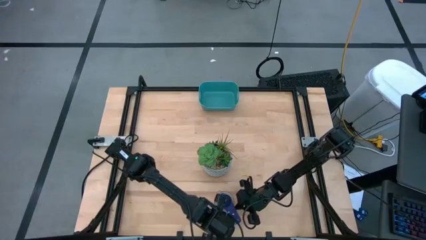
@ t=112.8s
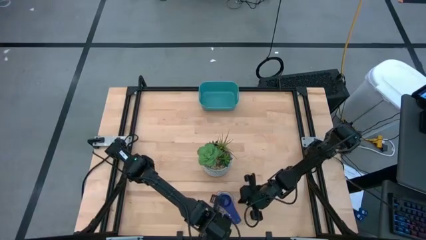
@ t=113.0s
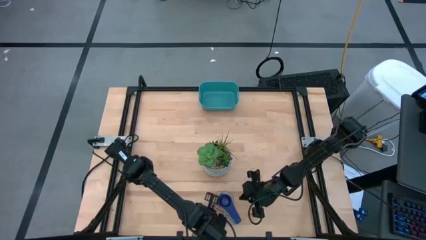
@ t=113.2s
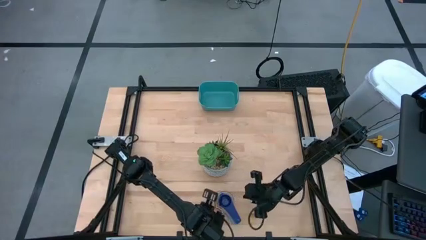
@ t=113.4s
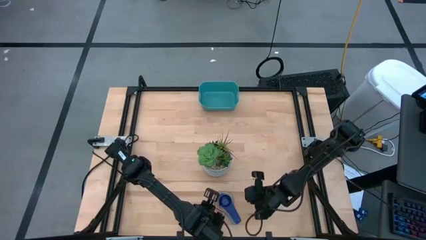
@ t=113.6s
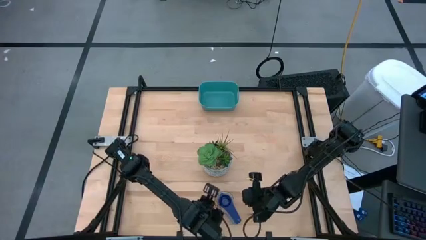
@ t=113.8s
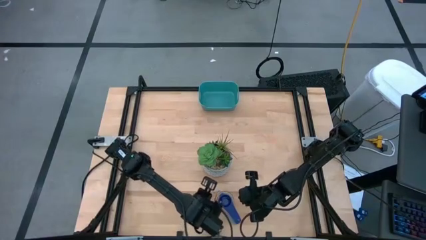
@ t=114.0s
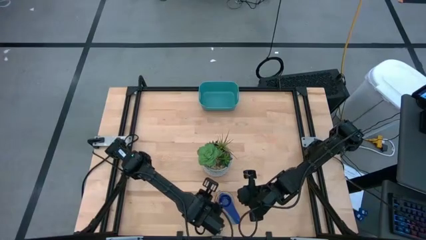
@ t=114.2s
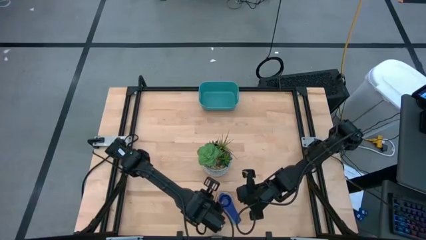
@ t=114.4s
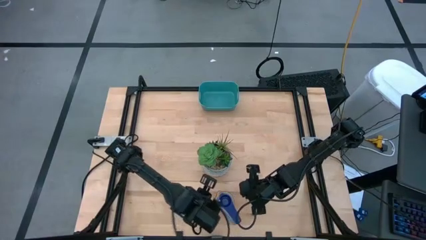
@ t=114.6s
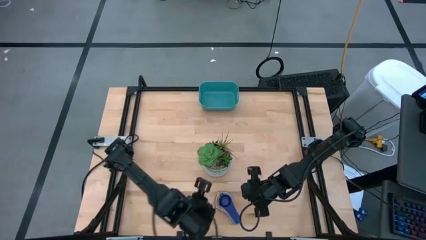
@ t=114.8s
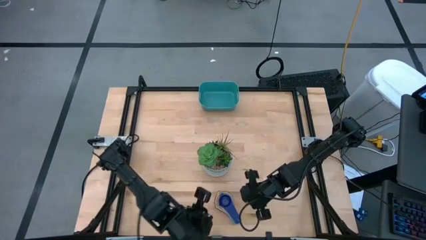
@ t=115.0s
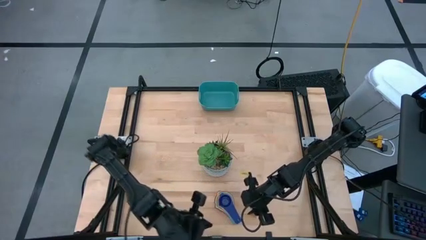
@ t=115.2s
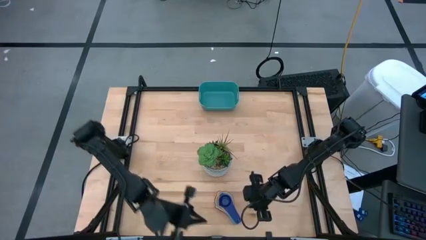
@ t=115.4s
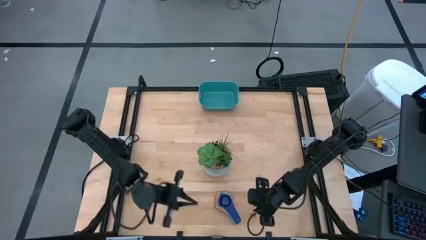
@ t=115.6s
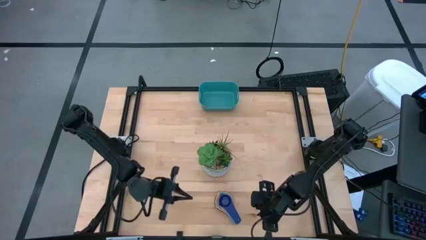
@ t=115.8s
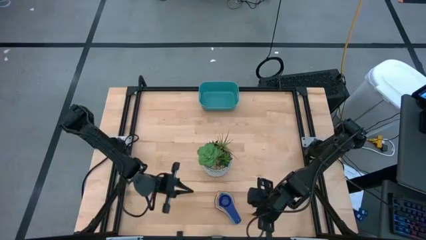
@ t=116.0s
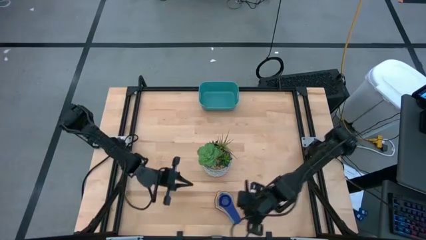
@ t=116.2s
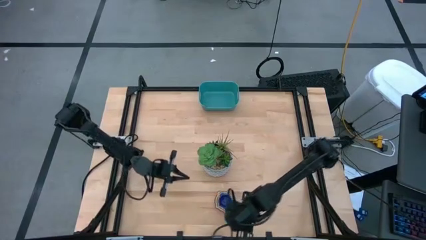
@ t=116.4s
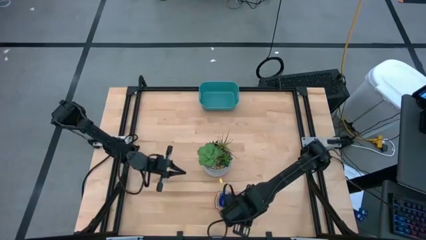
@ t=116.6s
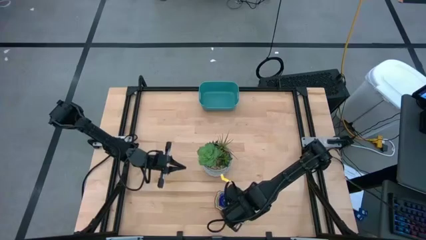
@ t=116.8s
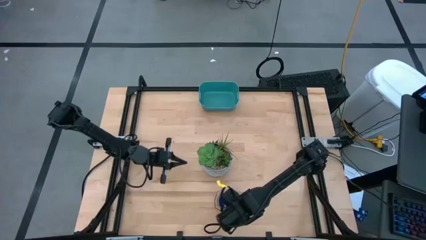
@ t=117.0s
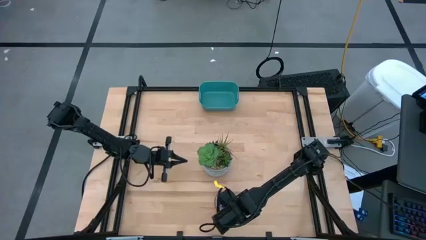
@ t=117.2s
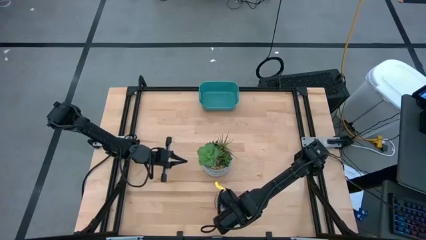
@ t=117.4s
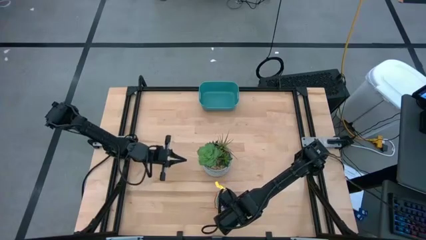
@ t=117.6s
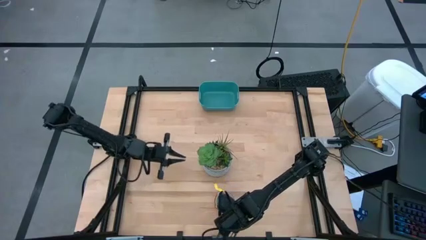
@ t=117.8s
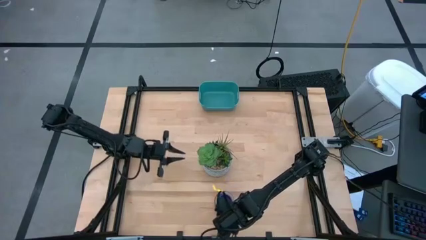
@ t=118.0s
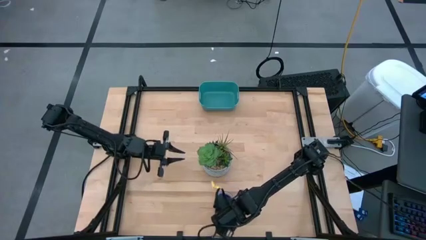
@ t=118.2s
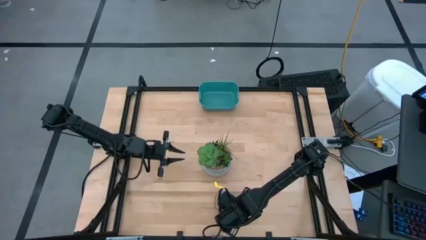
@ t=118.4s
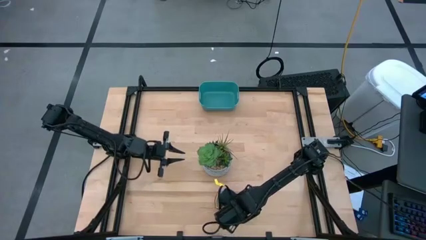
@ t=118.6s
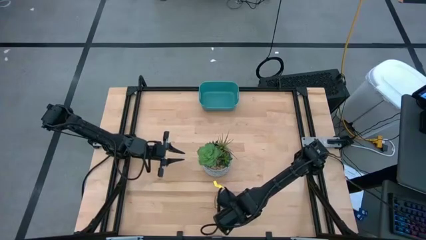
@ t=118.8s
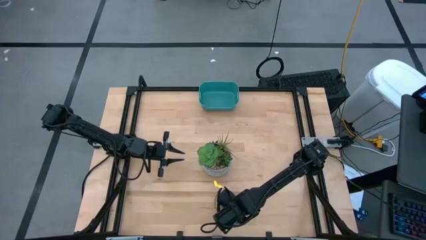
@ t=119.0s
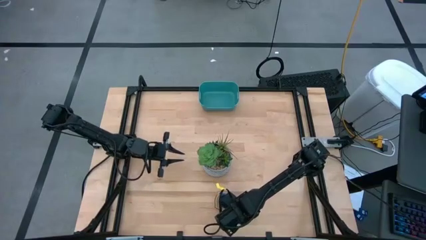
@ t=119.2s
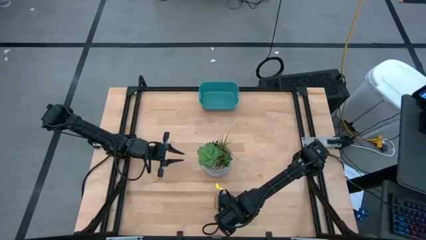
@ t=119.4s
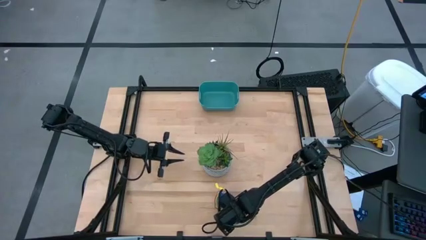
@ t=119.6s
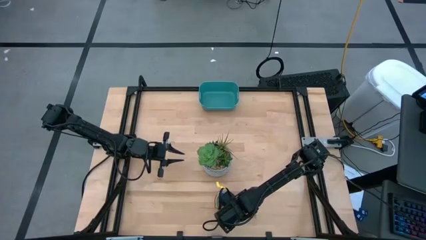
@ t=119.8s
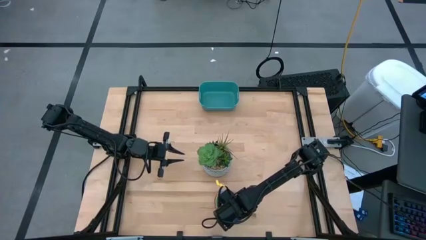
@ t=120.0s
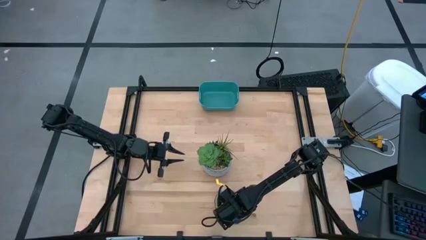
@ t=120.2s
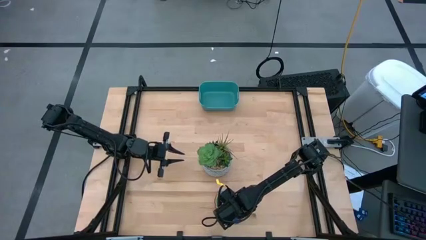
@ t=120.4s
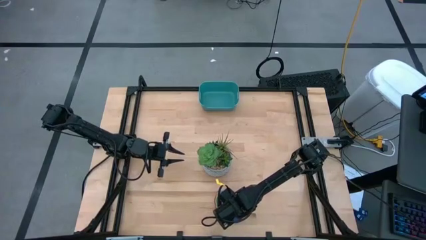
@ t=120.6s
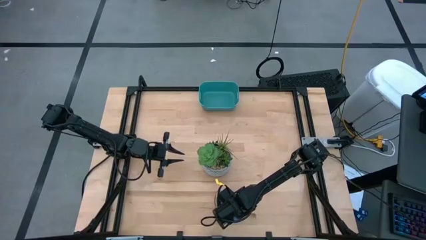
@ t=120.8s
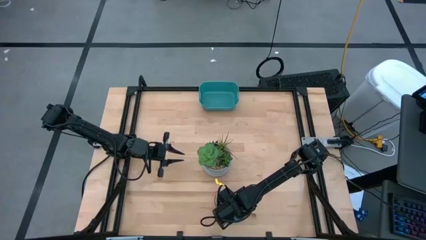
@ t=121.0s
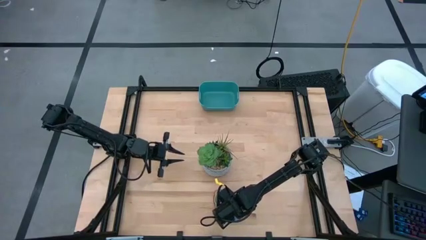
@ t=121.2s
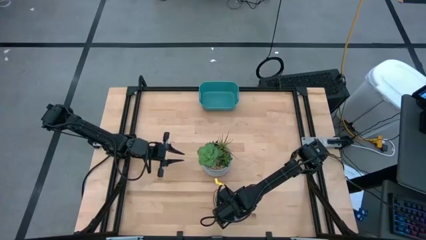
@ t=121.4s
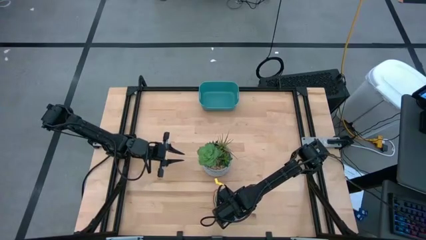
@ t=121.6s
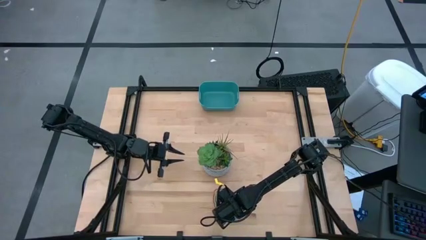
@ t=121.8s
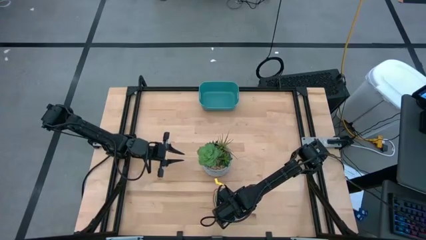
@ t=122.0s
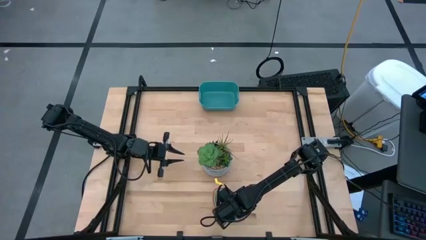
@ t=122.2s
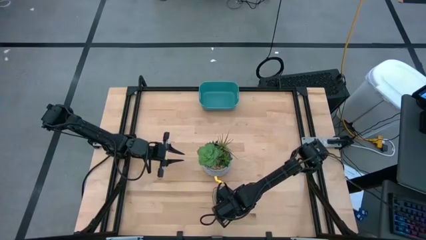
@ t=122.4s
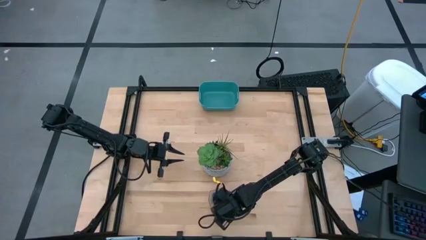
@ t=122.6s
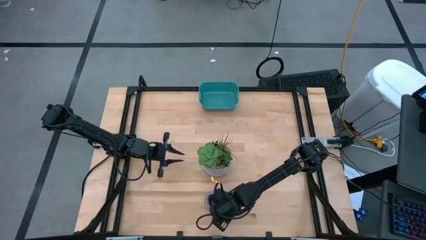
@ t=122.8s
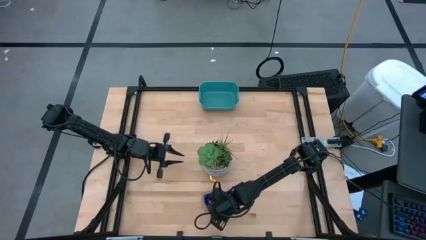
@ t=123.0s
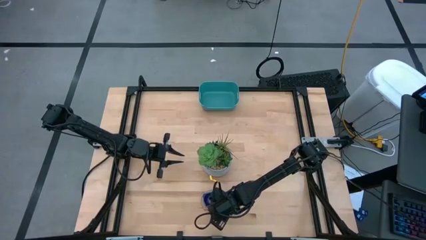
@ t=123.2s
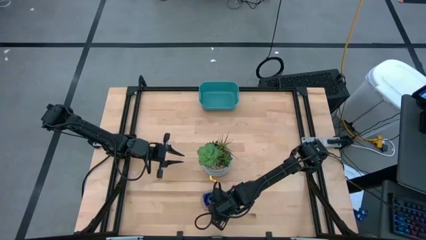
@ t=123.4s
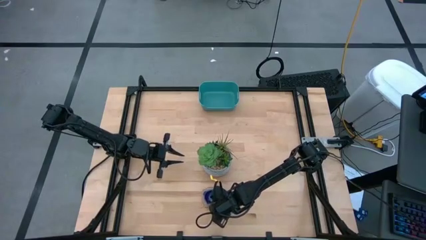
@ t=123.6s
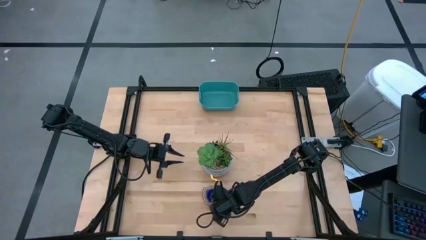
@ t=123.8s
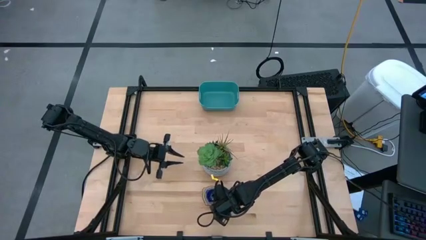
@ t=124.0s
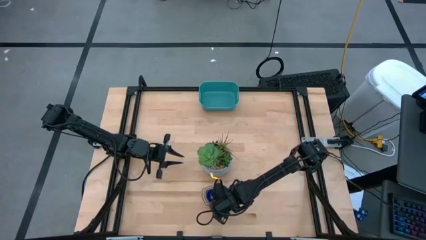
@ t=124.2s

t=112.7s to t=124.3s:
Task: Nest measuring cups in basket
Put the nested measuring cup into the green bin

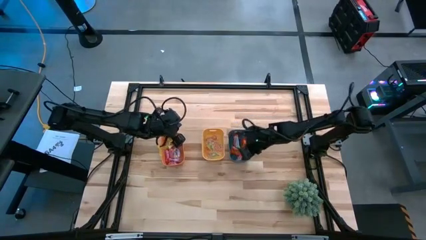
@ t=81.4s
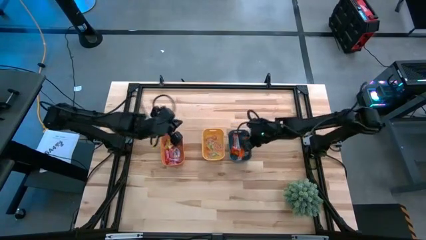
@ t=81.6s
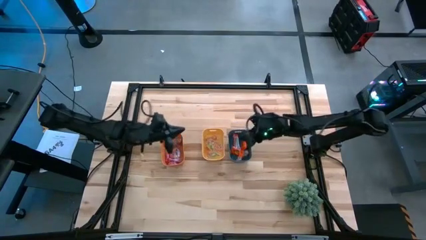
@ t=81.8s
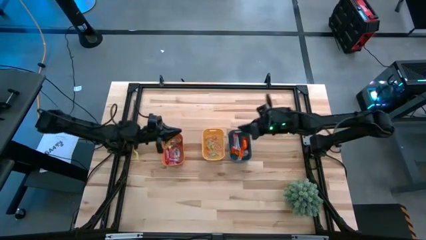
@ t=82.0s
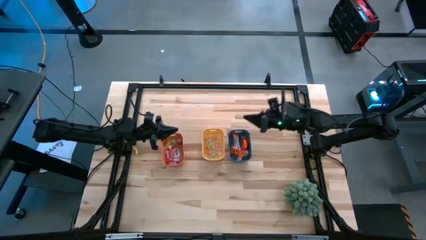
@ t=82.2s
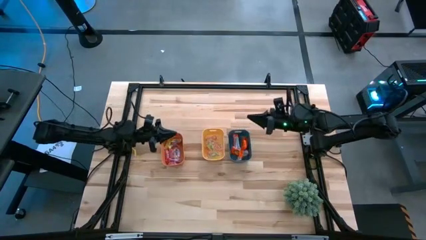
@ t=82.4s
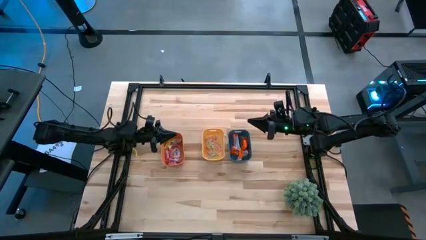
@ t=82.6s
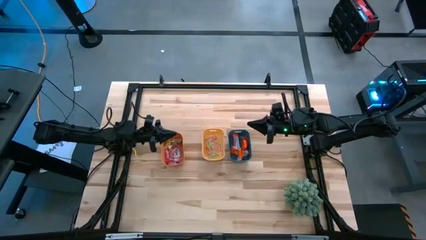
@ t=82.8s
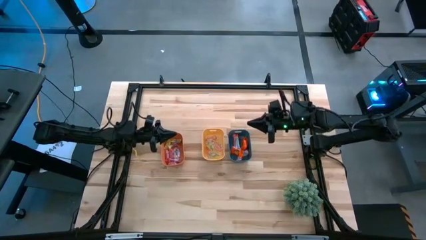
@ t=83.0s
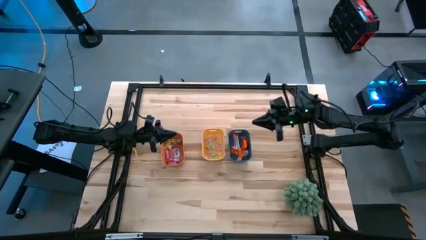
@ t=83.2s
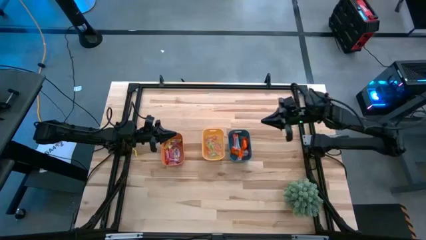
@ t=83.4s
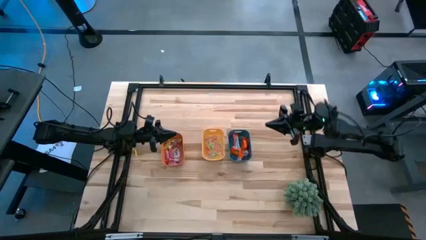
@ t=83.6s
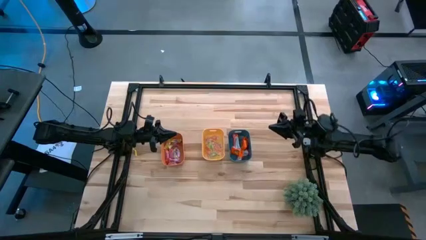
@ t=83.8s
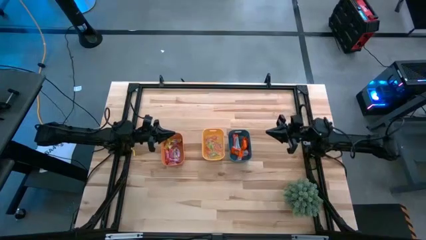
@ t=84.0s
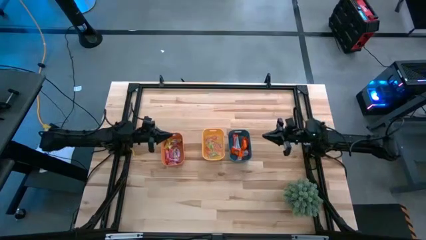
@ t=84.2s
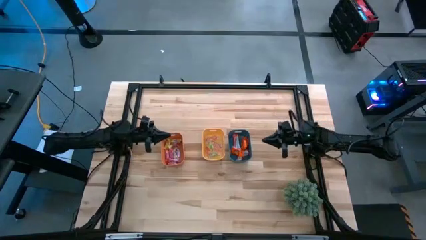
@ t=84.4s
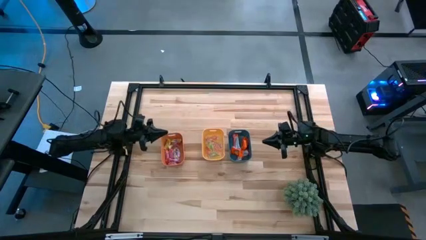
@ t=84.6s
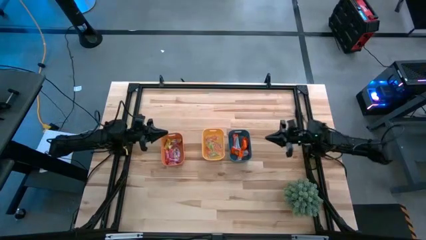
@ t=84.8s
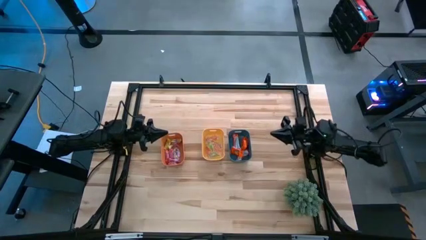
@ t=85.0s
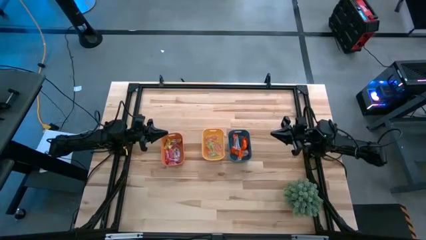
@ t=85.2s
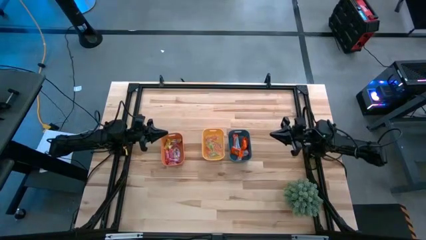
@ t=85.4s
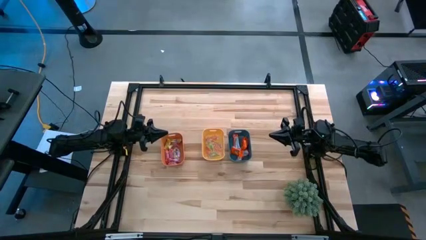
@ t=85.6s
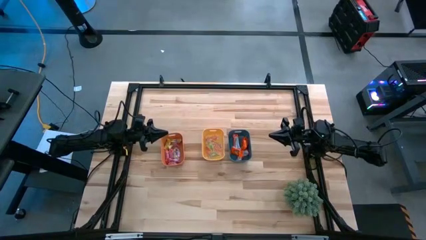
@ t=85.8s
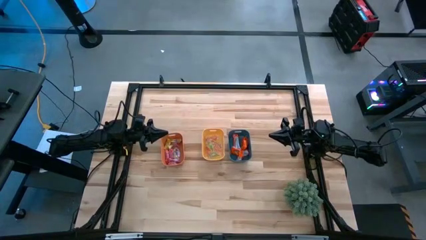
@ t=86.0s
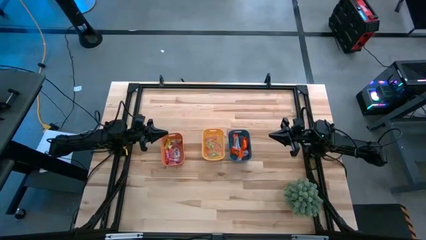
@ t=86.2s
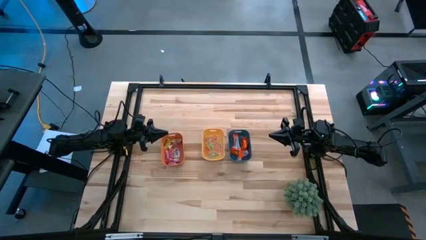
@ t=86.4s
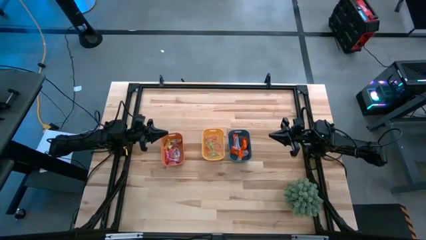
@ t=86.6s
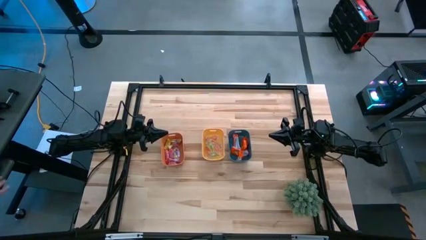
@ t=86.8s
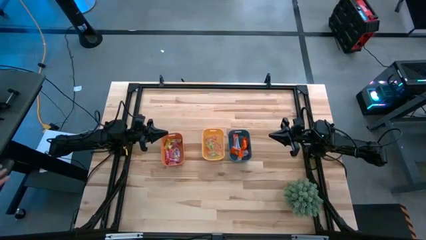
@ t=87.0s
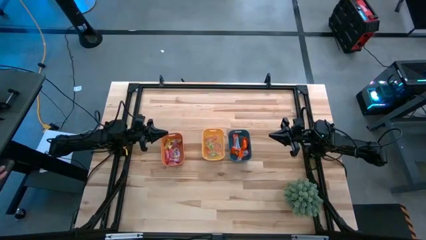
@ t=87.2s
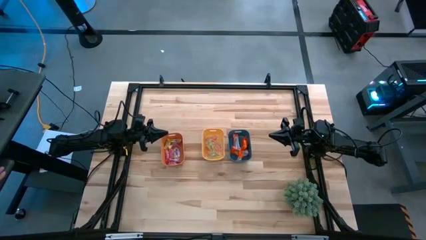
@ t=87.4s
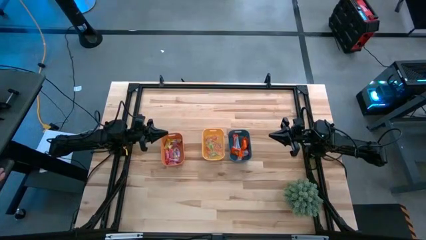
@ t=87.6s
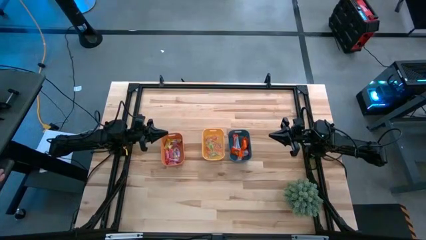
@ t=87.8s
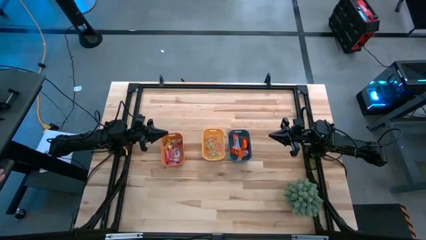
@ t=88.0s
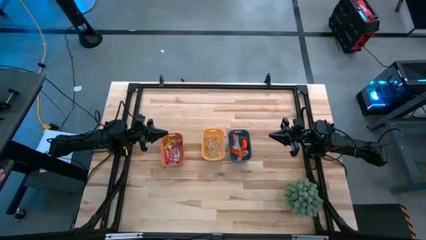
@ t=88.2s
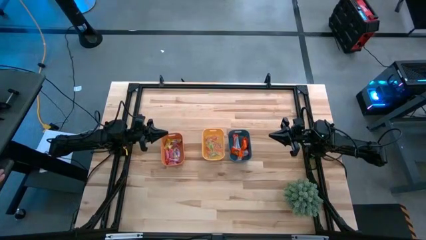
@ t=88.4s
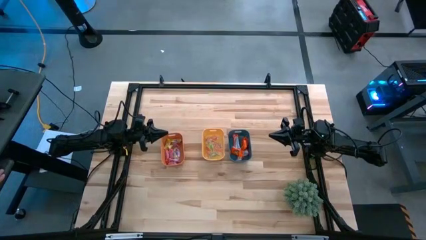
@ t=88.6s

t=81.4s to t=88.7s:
Task: Sort candy
Return to Home Position
